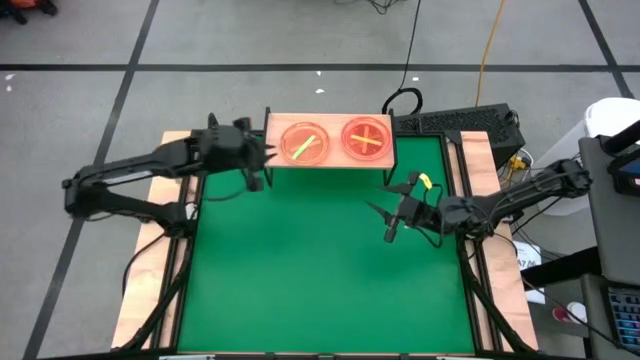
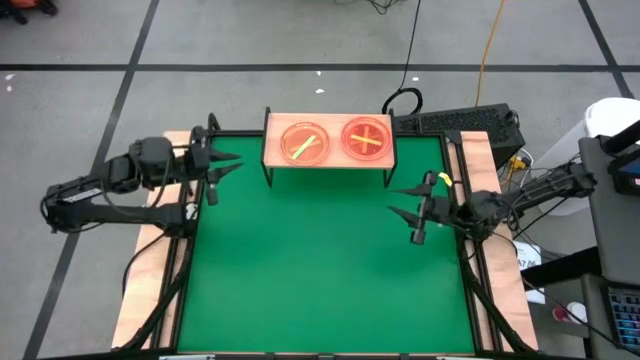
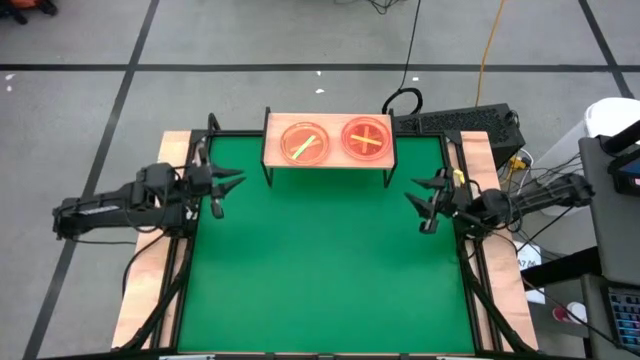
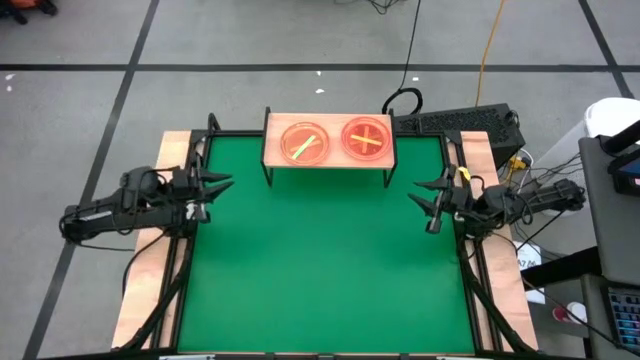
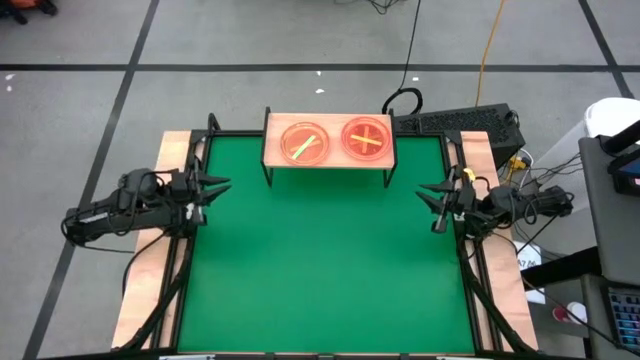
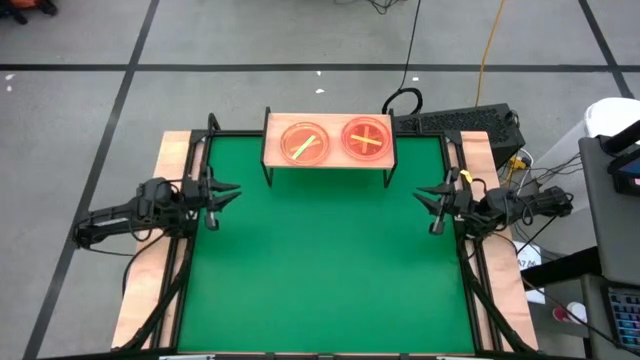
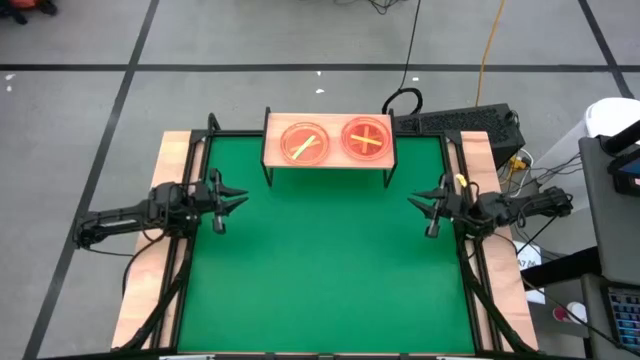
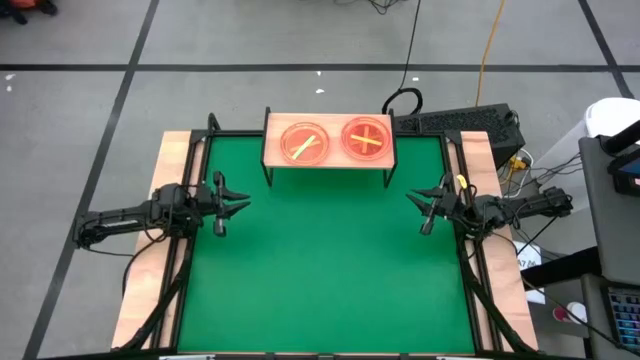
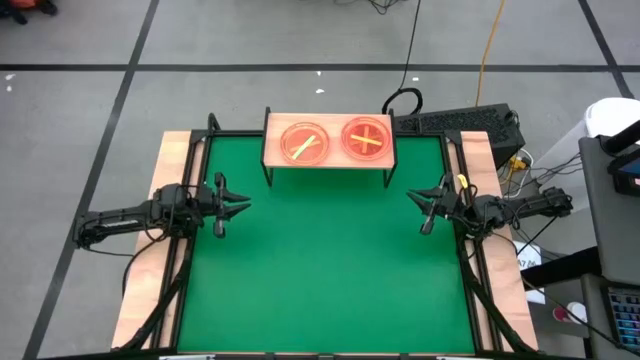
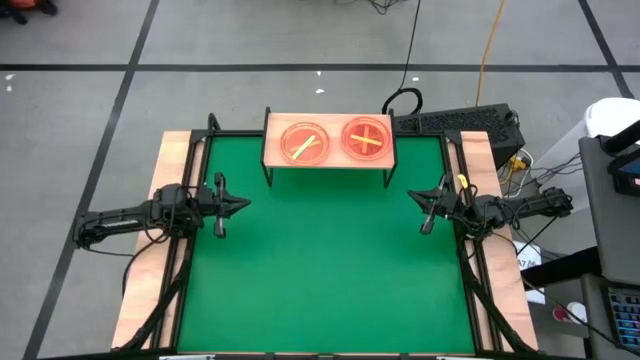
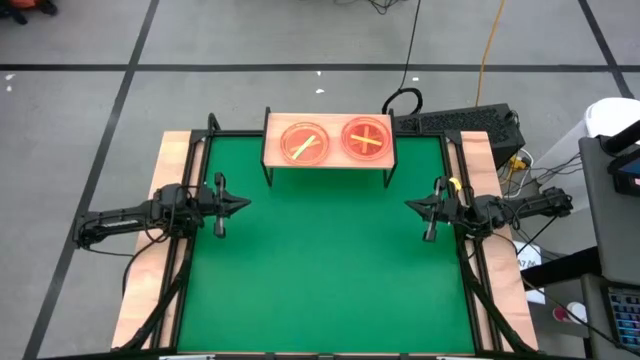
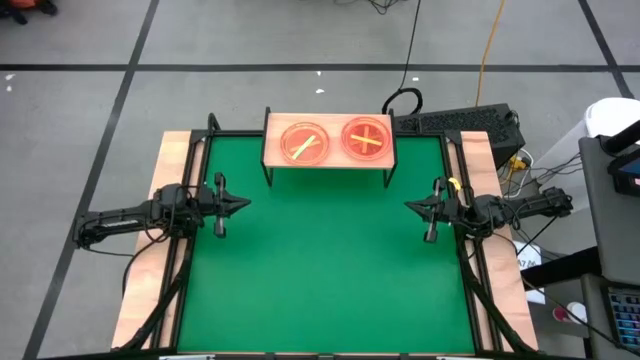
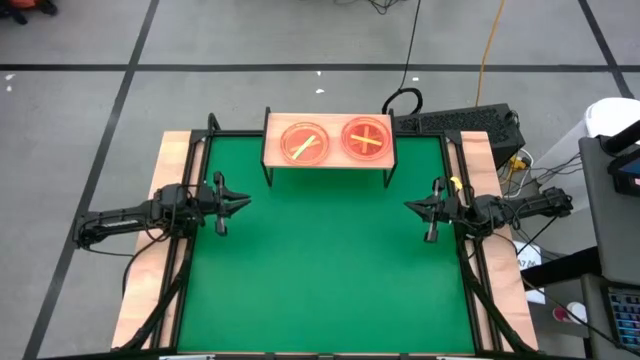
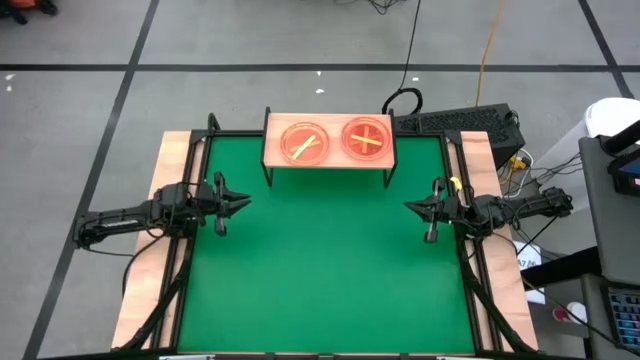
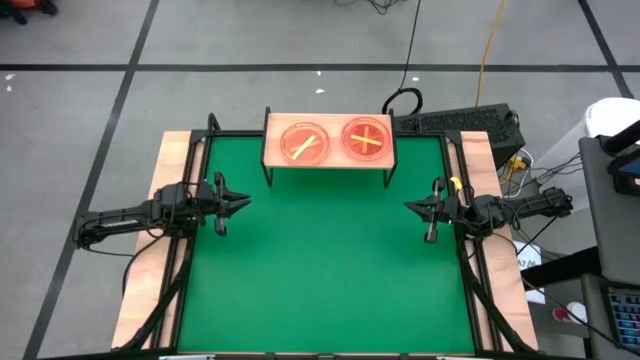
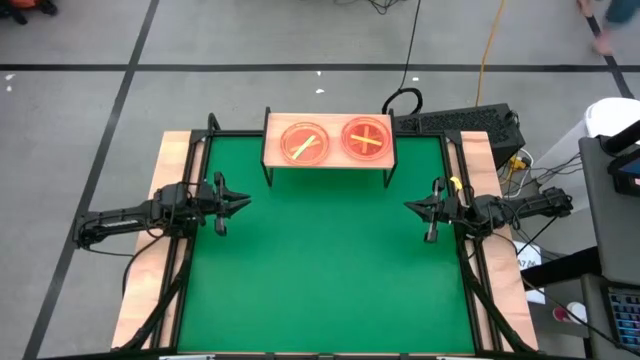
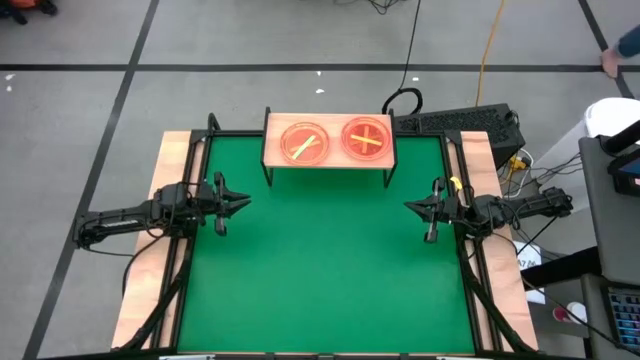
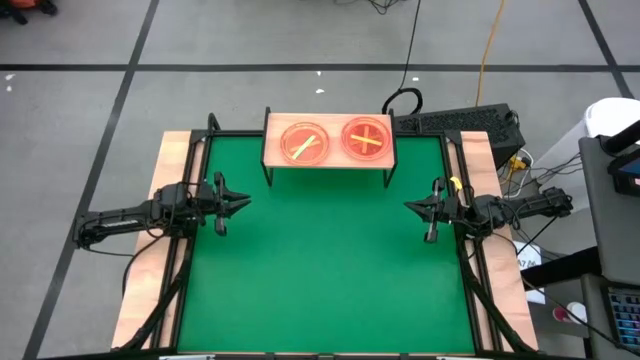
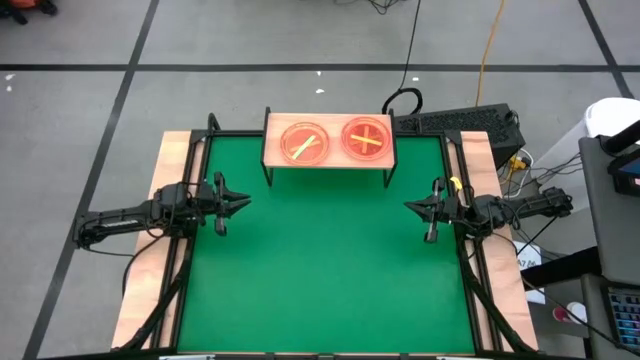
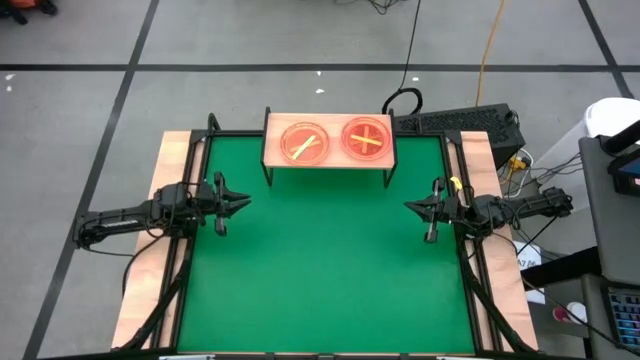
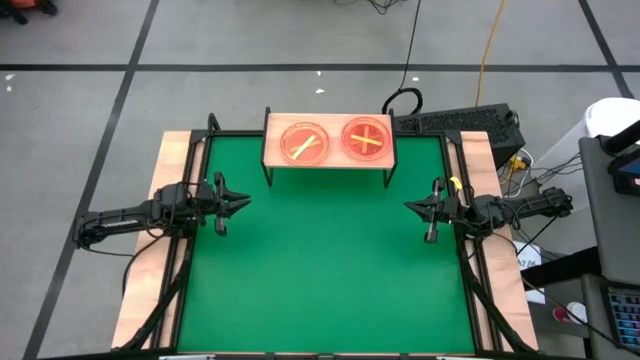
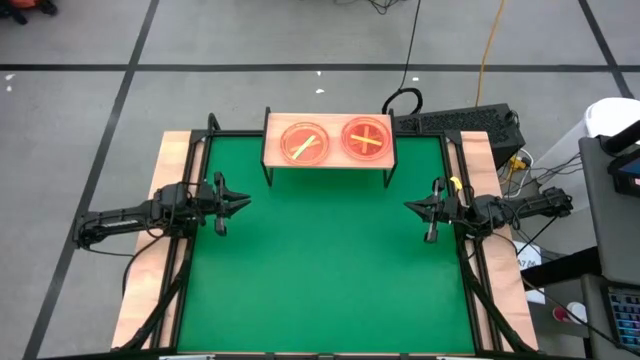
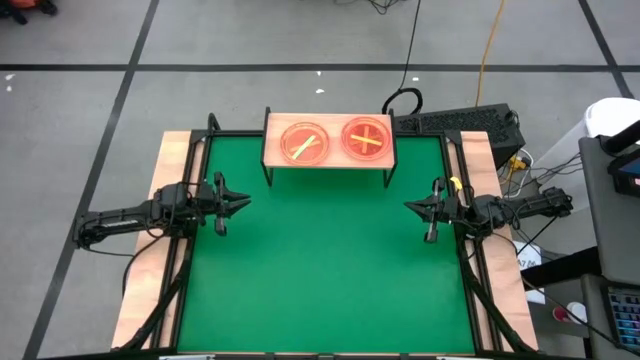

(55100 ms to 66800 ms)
Task: Place and stack plates onto a shelf
Return to Home Position

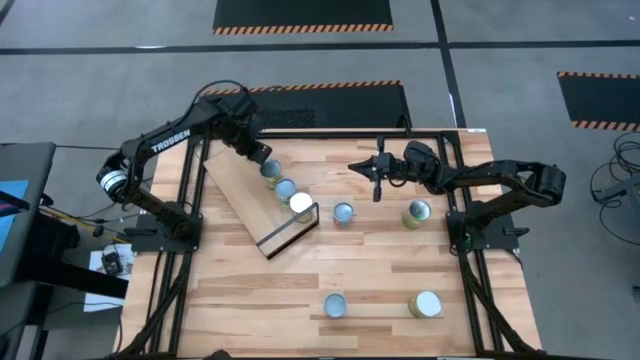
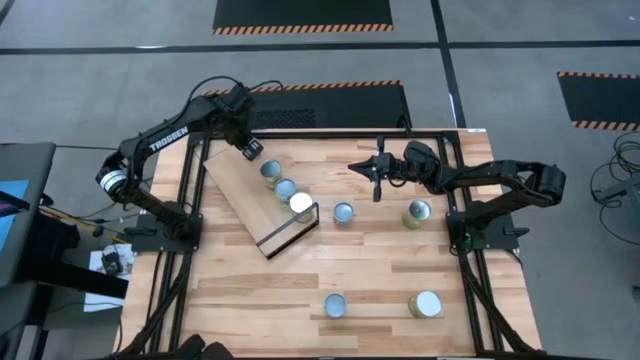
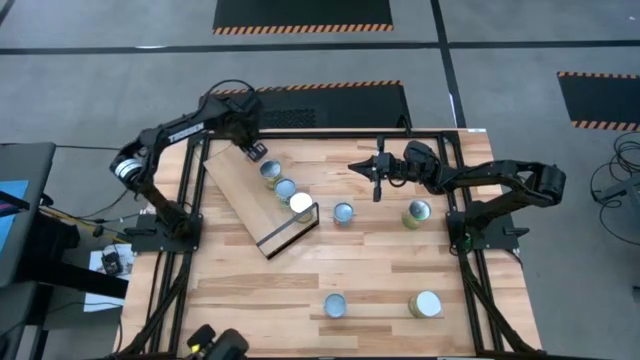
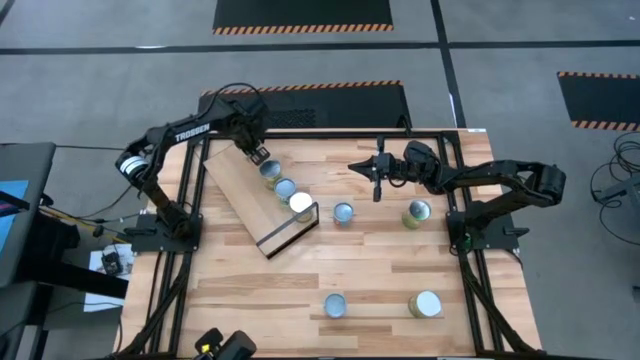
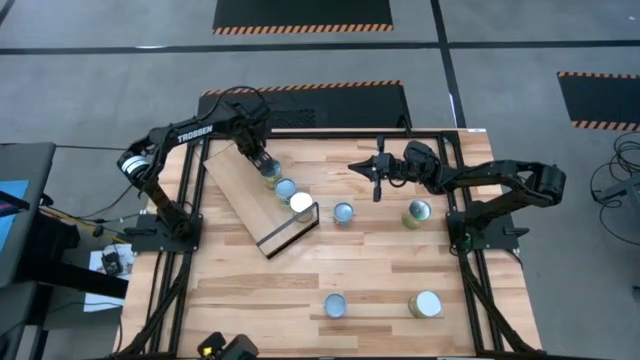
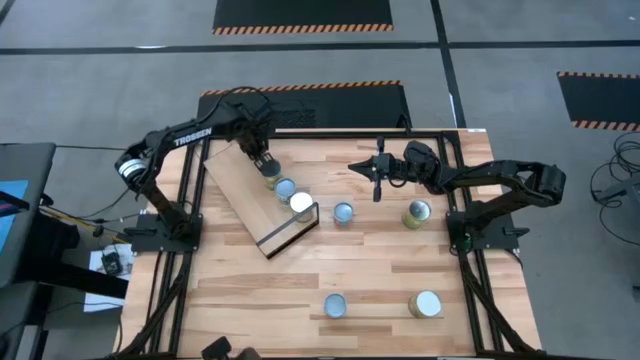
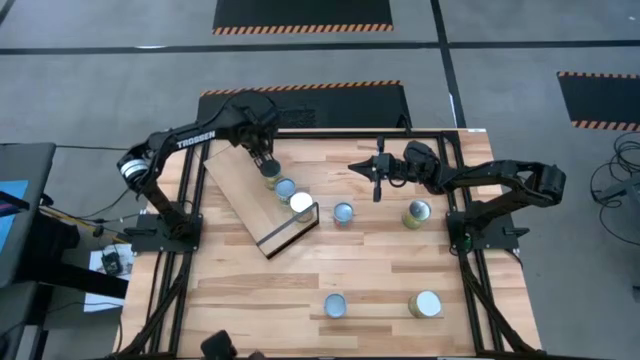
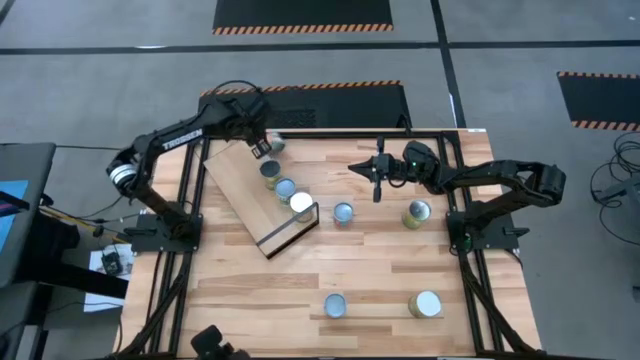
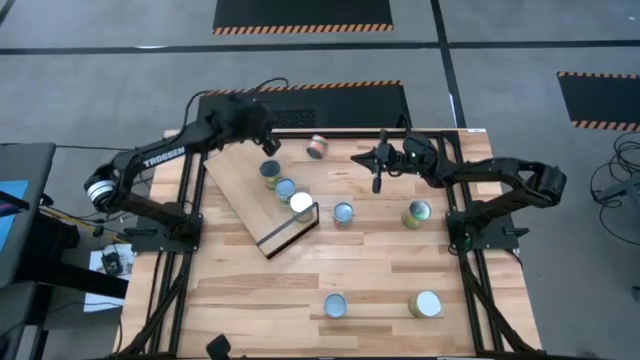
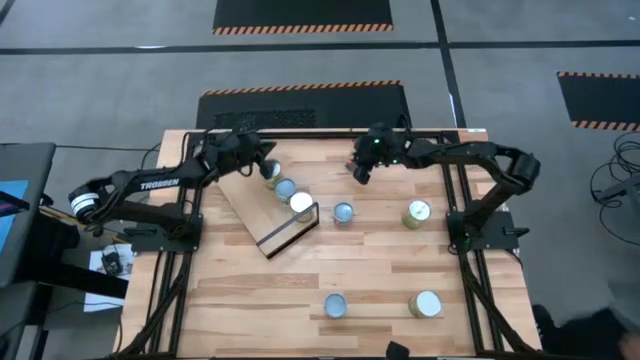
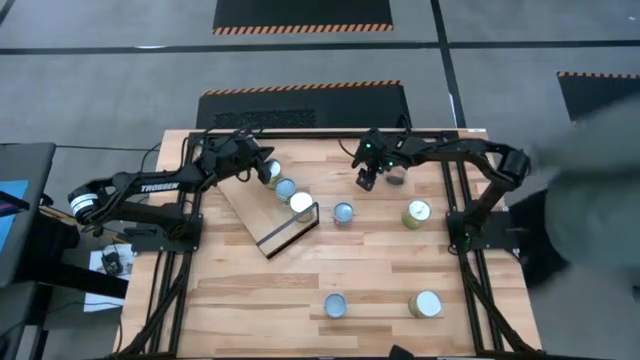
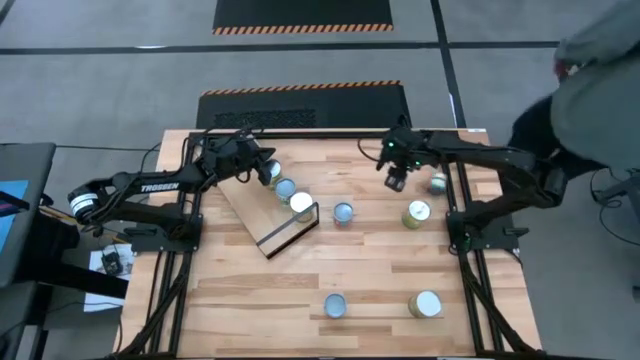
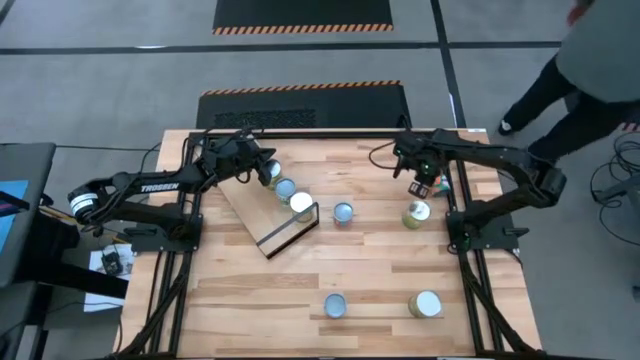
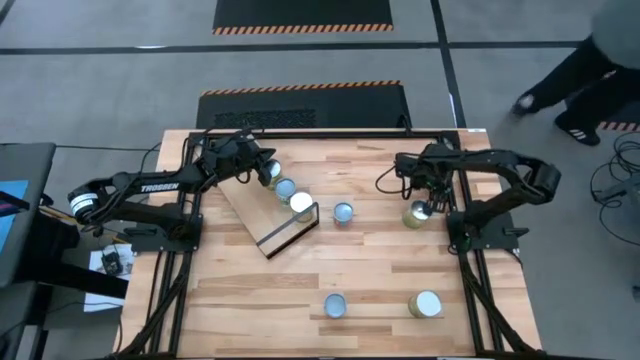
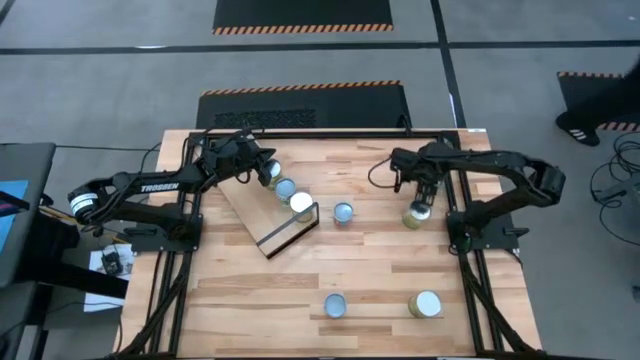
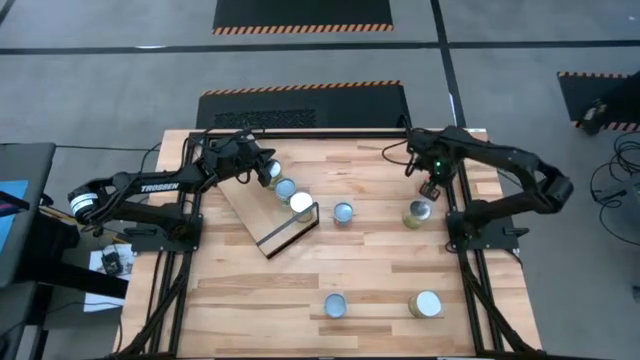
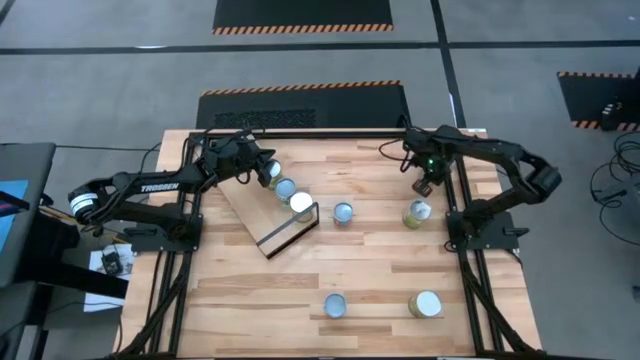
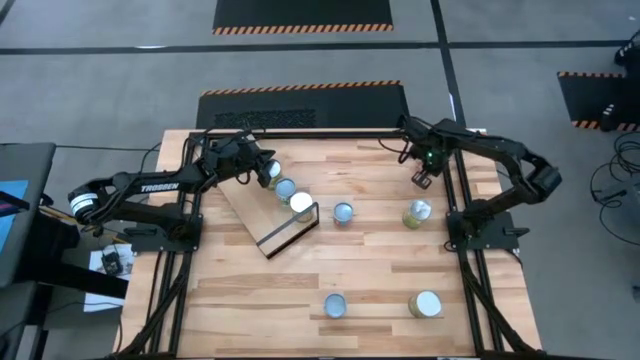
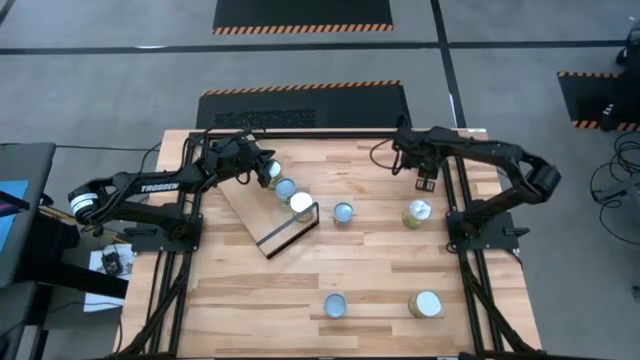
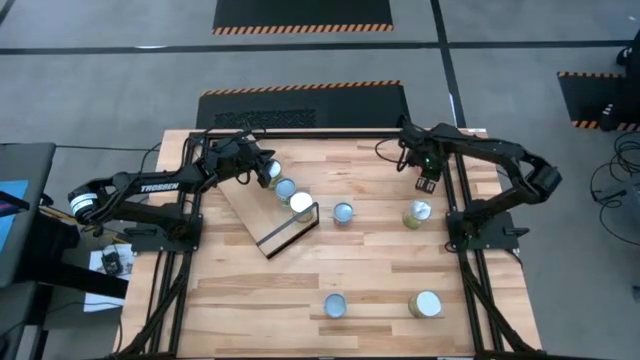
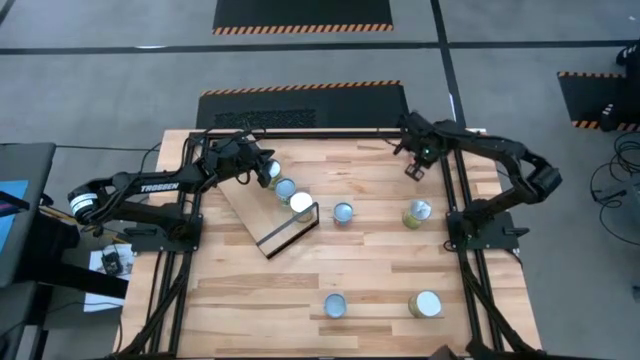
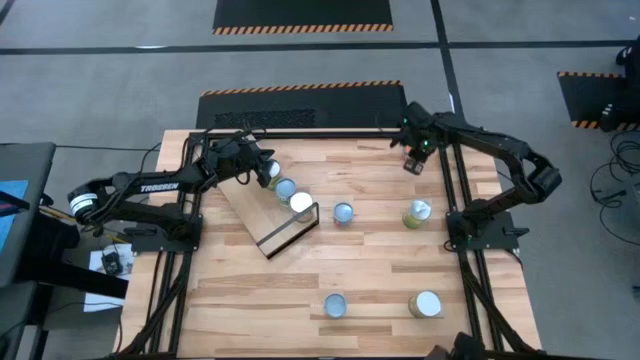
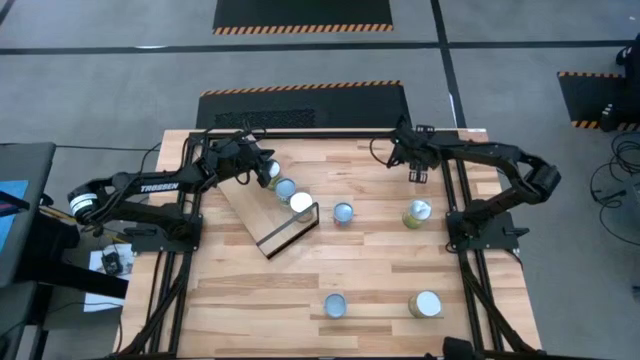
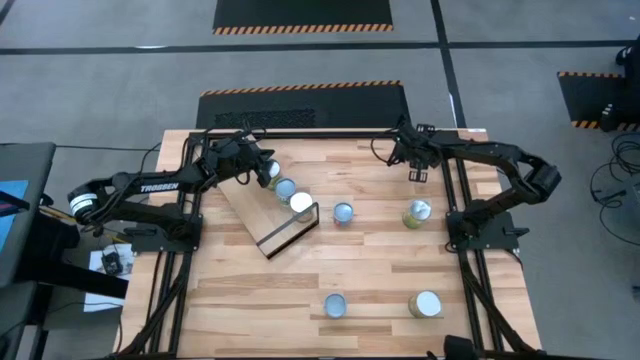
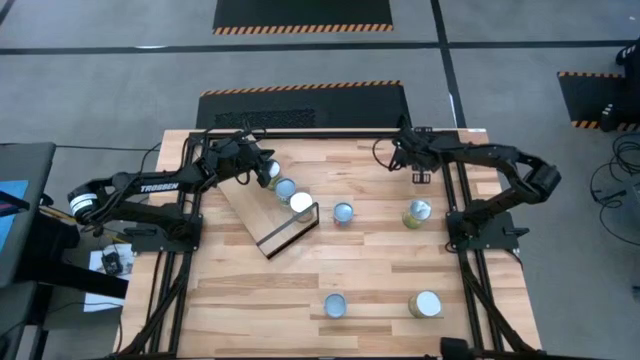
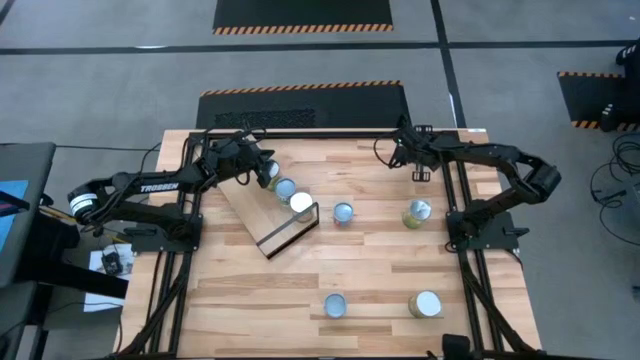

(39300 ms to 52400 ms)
Task: Pick and place cans onto a shelf
Adjust the small canned oranges on the shelf
